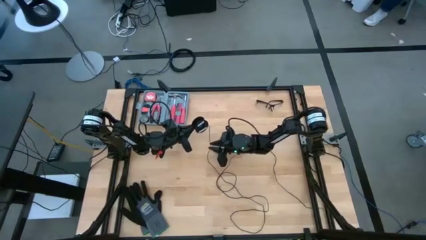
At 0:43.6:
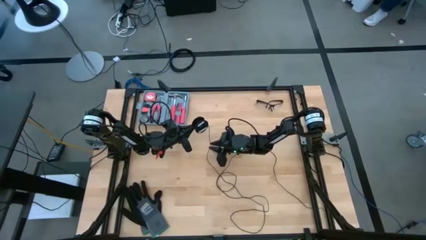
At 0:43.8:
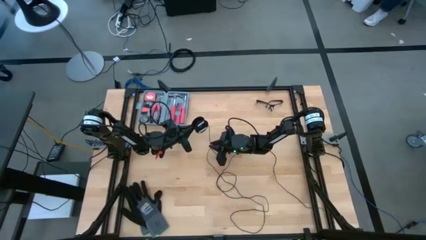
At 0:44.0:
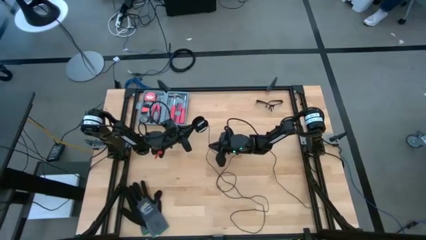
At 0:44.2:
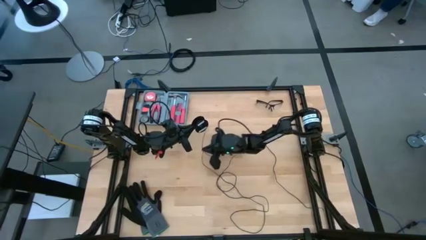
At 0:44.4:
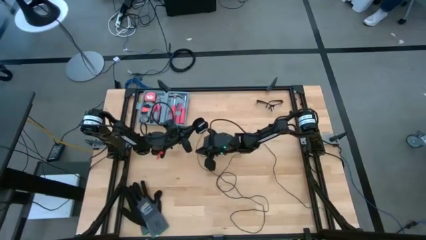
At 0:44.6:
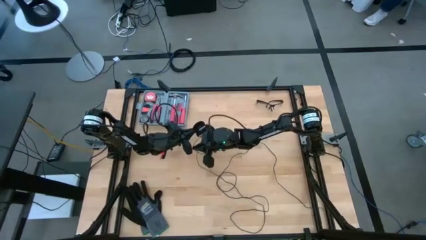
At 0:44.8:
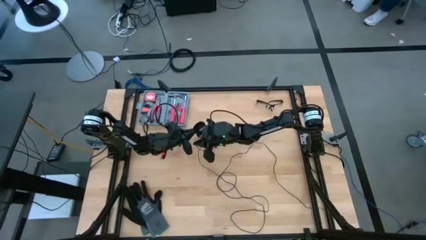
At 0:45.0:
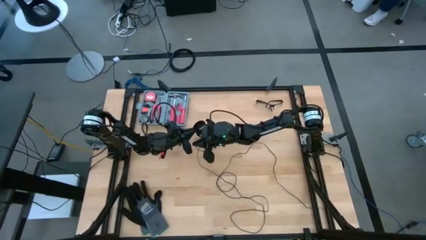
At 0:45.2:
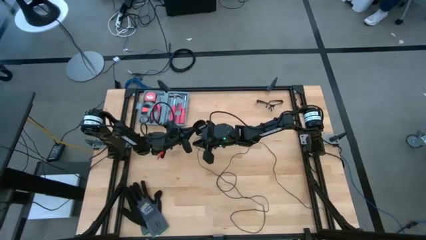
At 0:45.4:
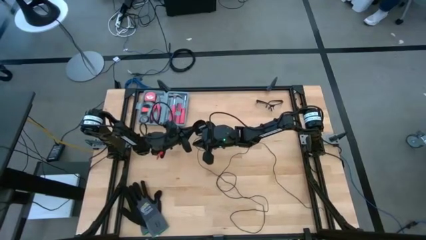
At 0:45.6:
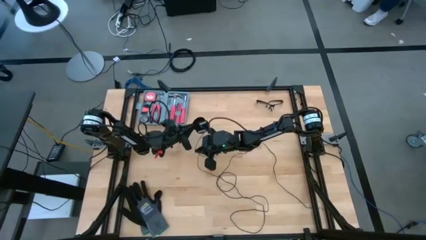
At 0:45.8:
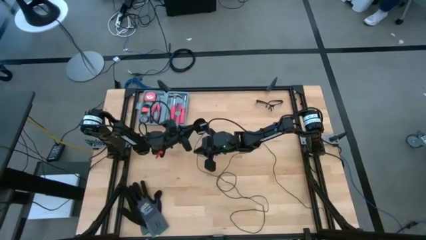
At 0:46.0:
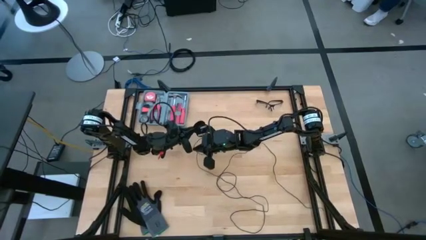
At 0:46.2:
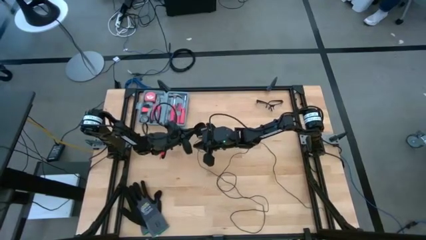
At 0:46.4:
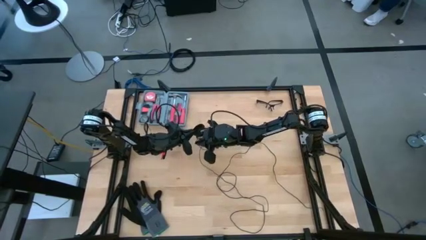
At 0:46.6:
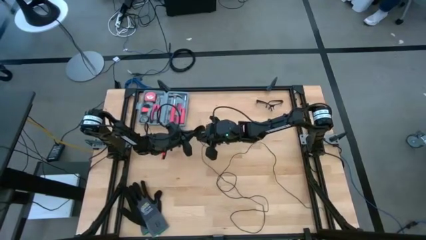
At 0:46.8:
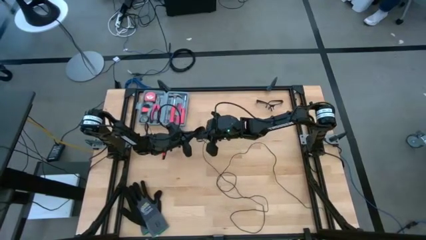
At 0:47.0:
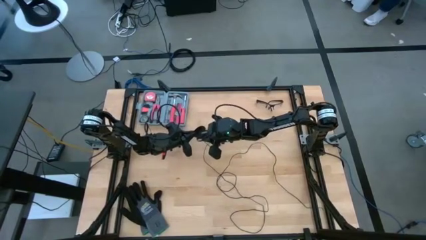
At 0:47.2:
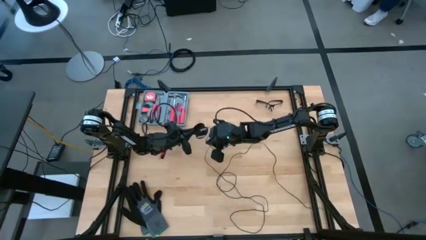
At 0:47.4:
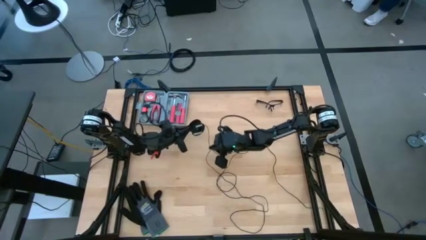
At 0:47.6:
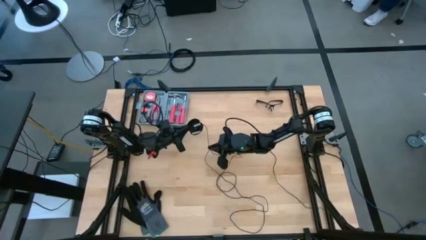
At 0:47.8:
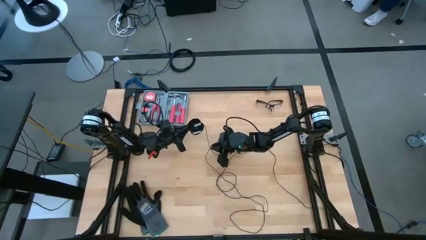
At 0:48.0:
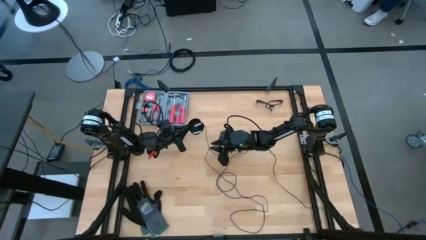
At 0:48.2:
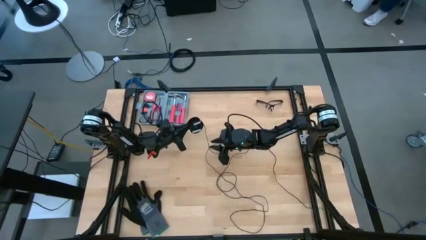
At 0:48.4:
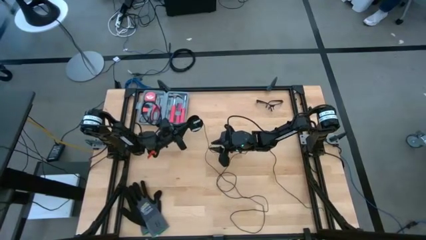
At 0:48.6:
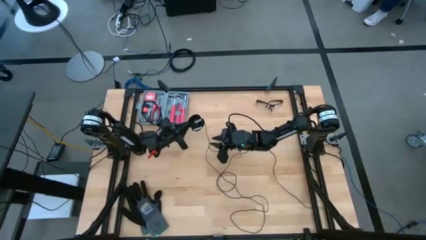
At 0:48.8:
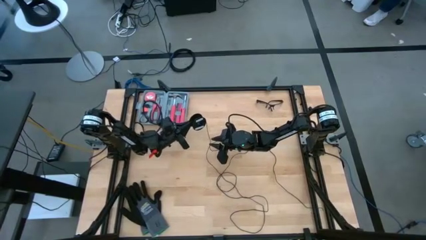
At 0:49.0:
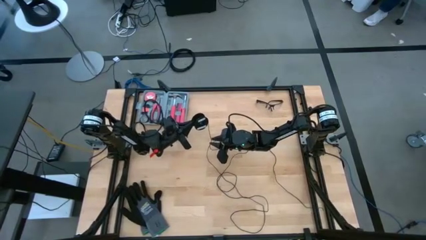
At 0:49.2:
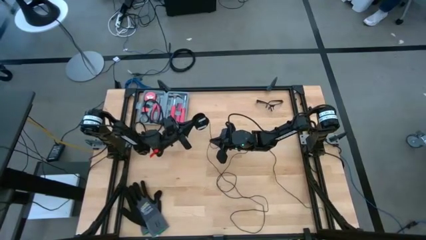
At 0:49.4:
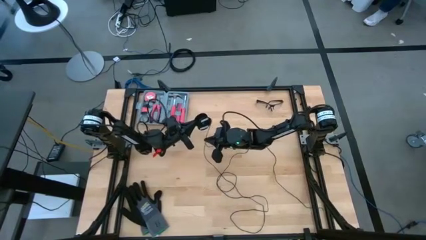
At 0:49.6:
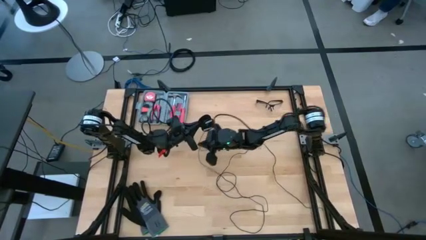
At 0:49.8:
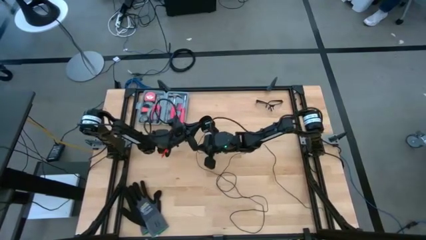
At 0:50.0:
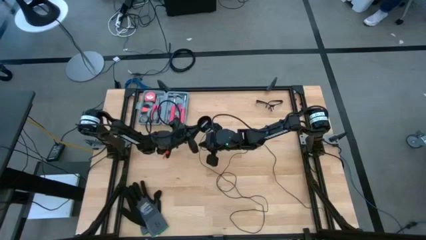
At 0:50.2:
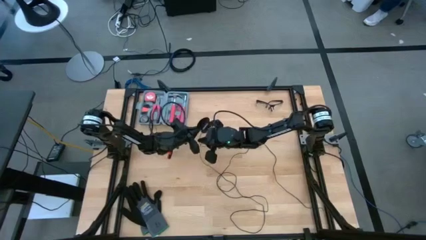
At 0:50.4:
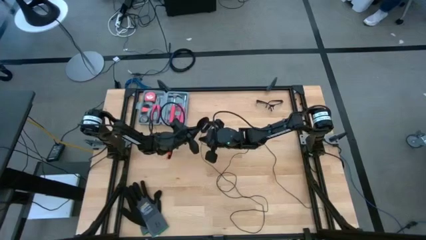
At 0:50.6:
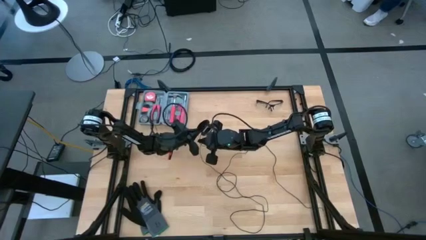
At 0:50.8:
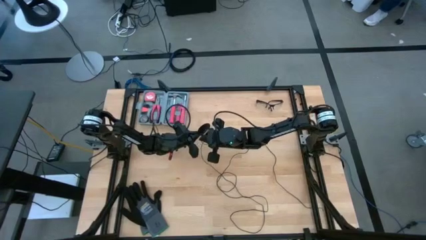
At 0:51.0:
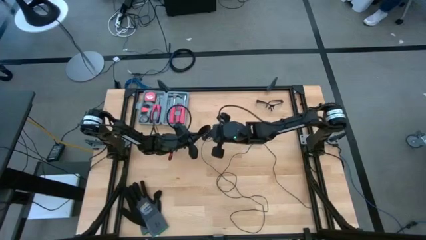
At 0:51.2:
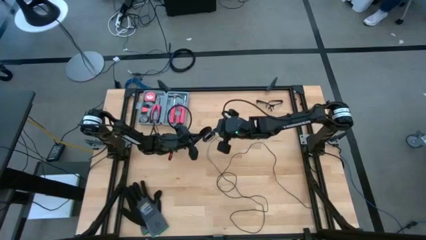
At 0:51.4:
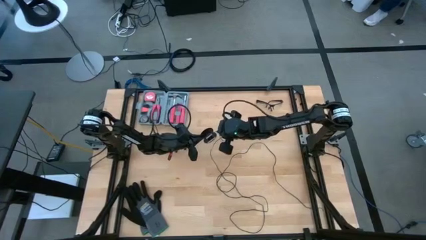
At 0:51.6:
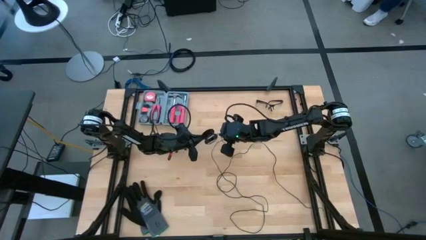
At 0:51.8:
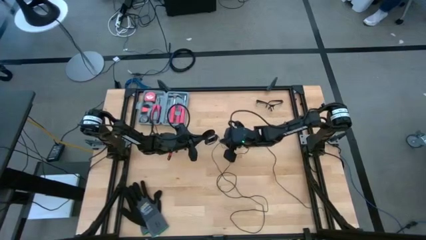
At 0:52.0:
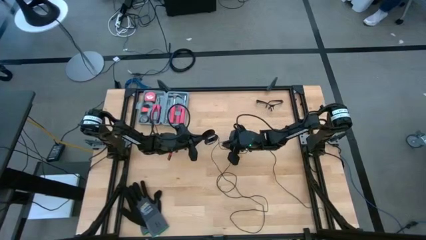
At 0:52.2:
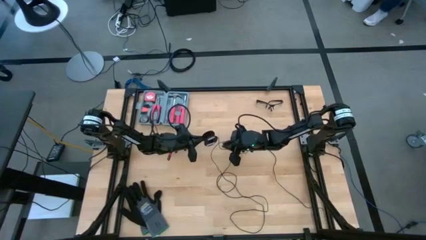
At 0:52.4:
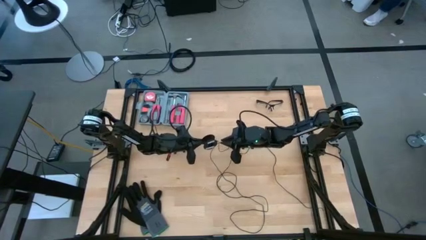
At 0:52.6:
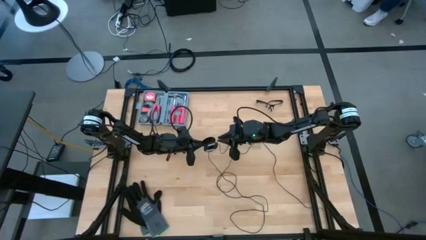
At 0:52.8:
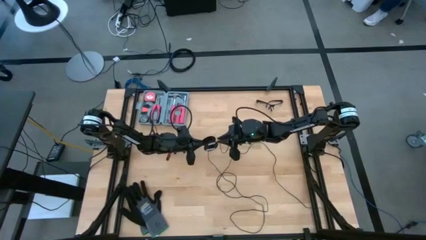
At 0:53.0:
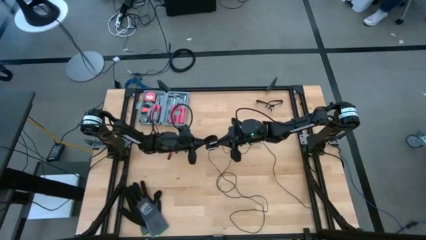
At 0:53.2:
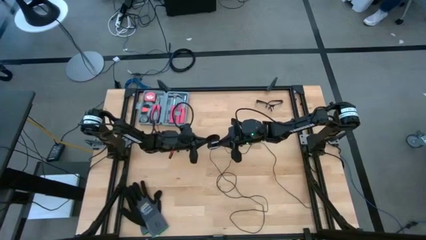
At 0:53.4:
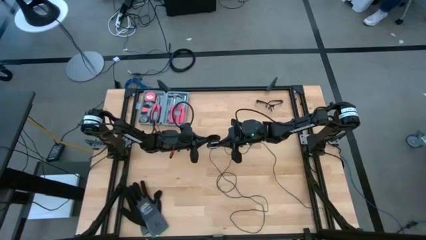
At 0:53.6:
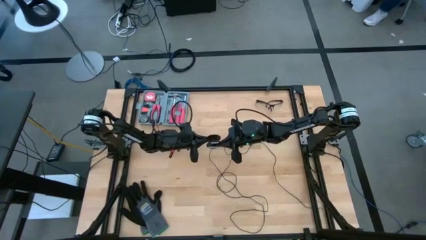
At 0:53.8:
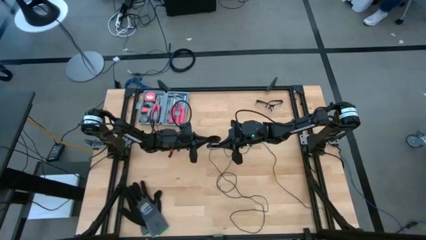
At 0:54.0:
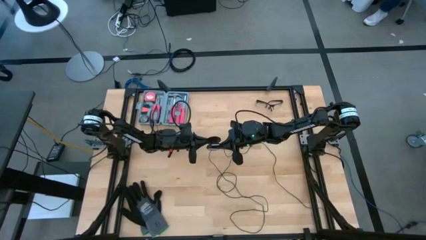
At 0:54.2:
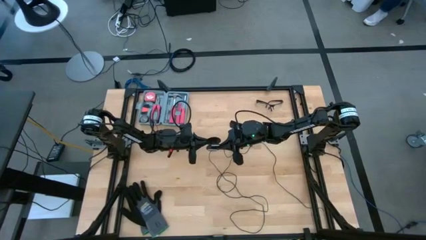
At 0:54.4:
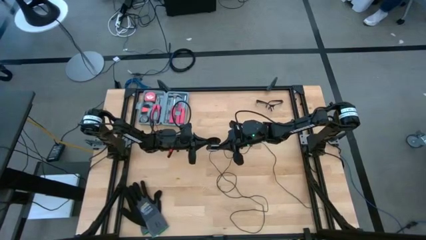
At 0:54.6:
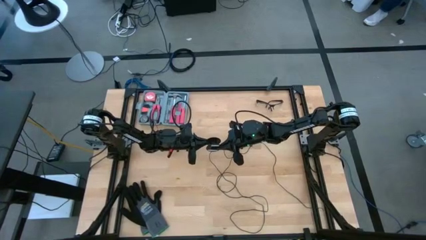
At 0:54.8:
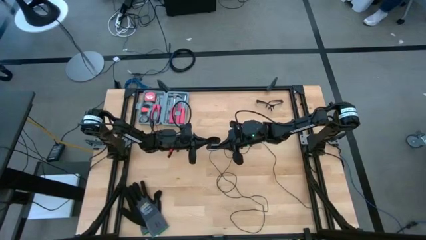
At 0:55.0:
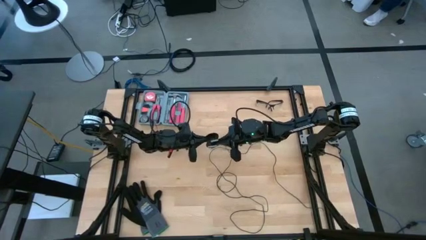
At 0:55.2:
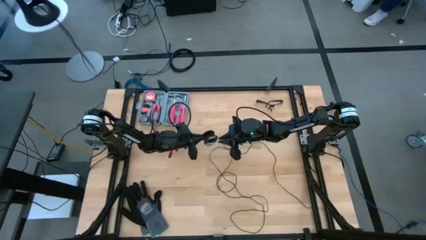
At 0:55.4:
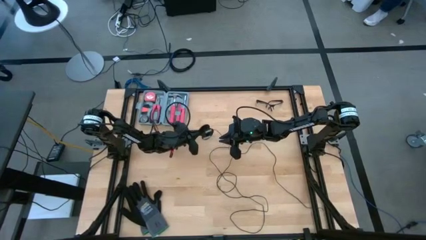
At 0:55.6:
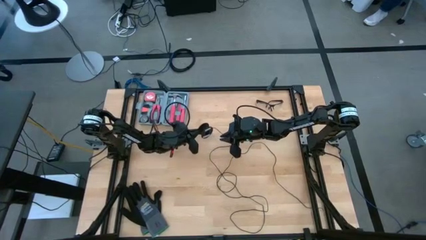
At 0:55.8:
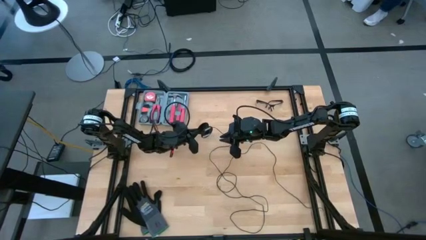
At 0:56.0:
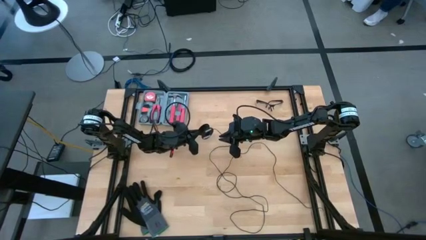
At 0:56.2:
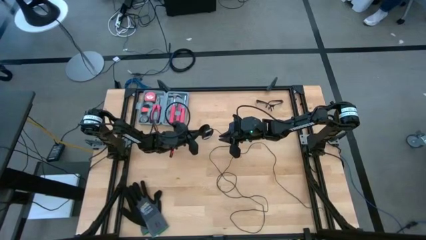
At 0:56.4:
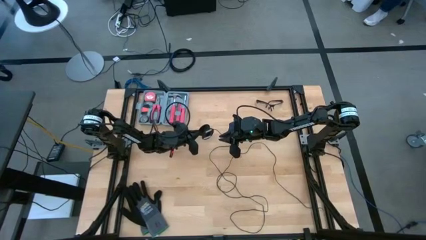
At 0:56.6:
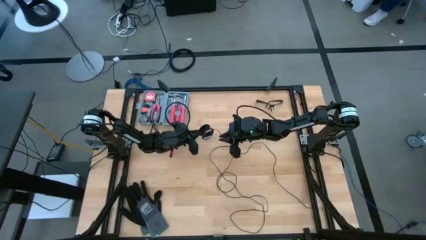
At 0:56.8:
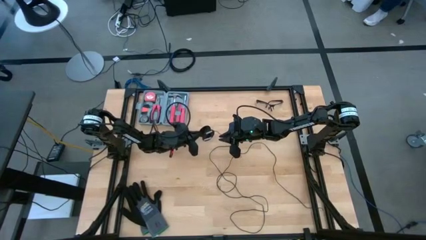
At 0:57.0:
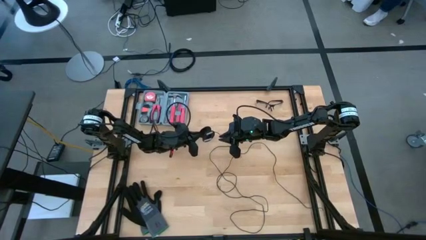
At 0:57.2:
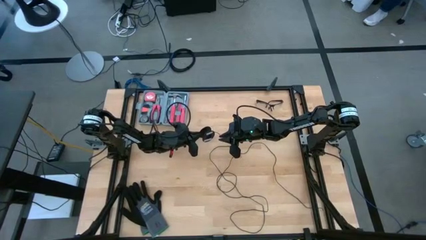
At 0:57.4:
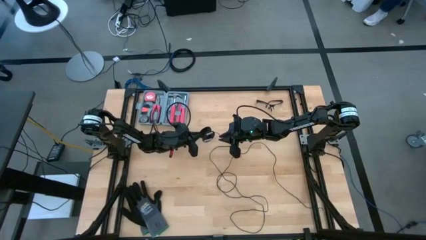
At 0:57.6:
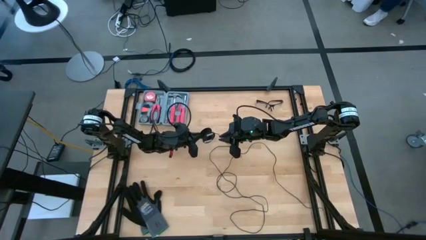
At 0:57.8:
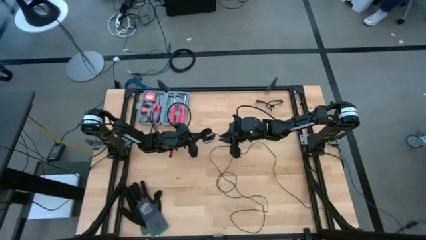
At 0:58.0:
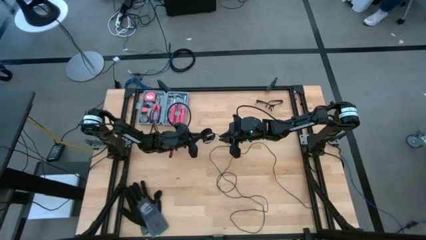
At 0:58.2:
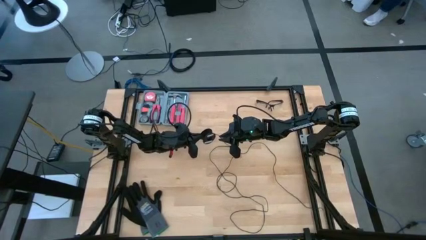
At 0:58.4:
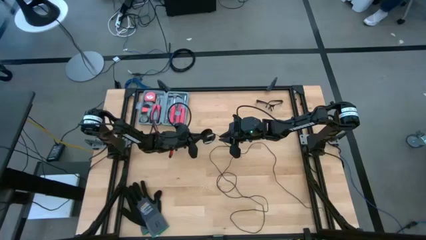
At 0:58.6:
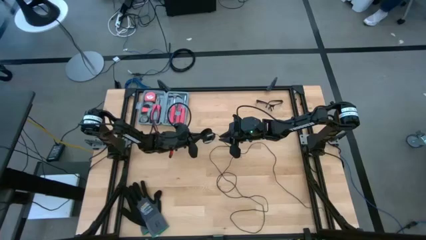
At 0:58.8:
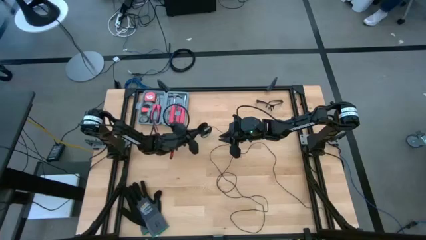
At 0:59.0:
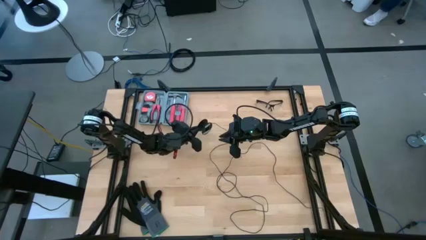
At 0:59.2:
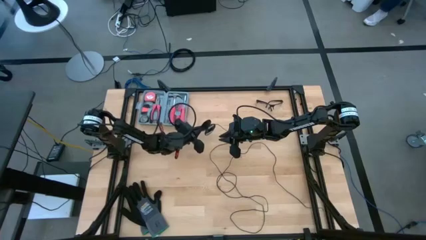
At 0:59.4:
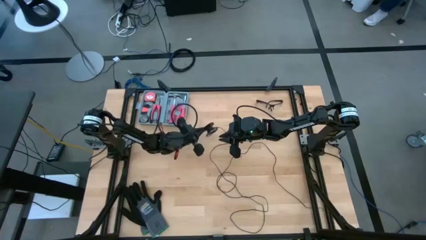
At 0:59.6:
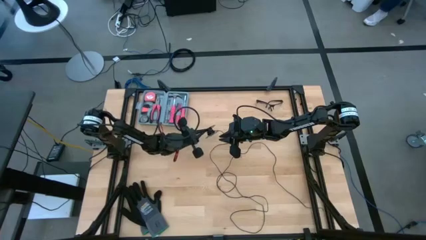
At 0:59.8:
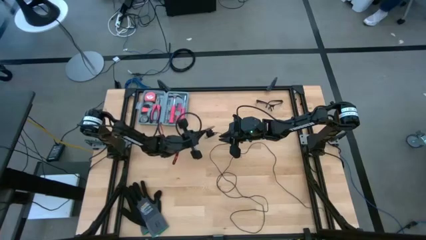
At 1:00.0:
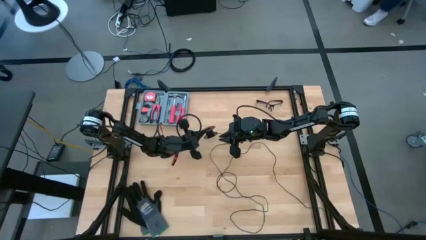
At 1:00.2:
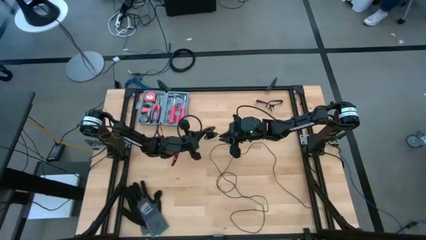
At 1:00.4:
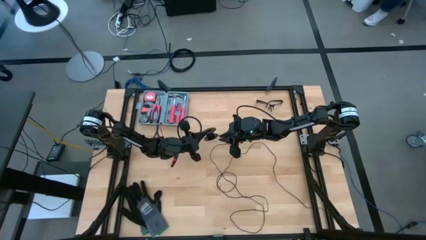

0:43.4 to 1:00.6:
Task: Coil cords
Coil the black wire on the black spool
